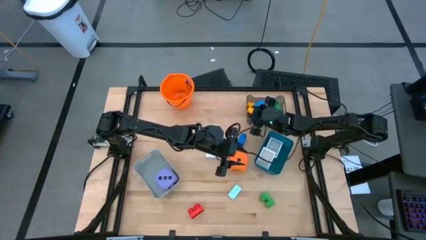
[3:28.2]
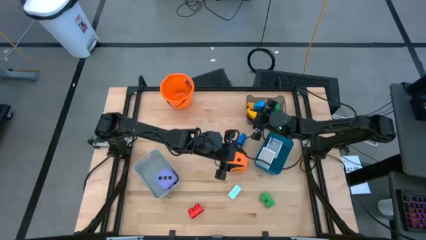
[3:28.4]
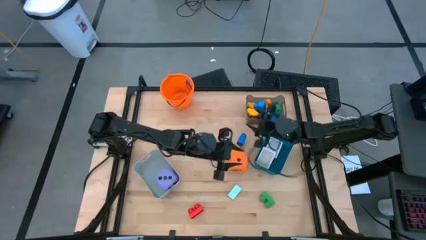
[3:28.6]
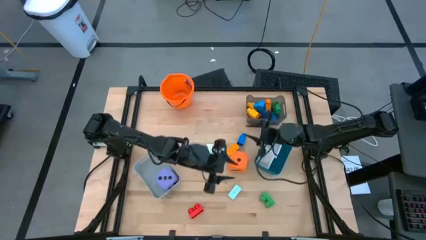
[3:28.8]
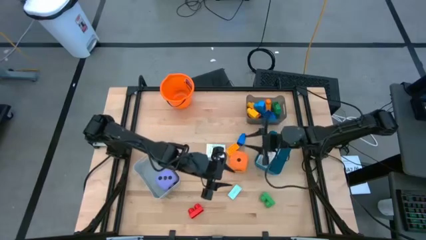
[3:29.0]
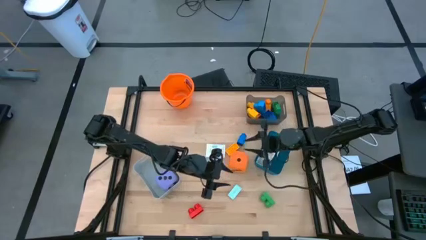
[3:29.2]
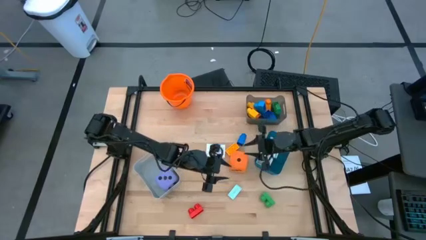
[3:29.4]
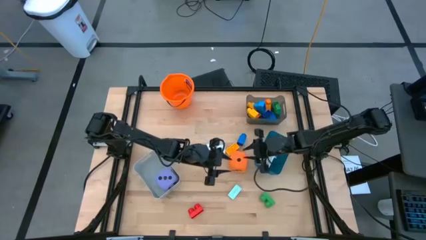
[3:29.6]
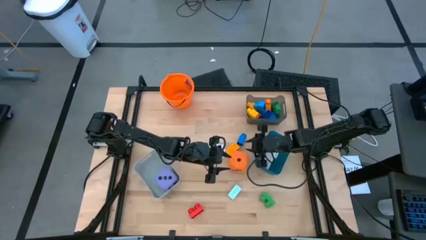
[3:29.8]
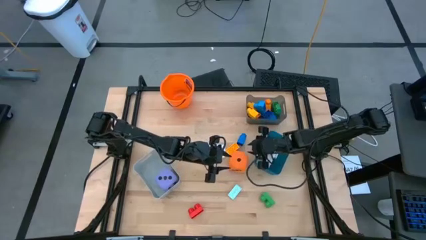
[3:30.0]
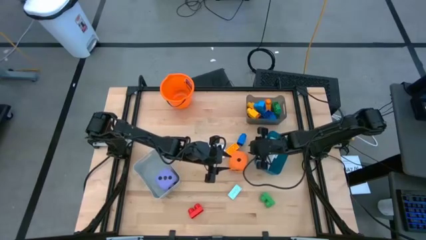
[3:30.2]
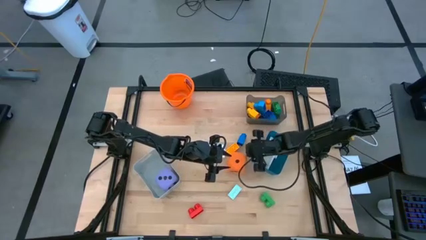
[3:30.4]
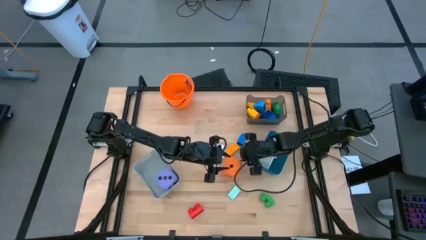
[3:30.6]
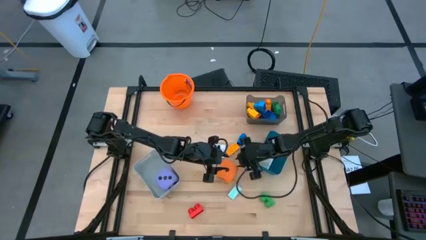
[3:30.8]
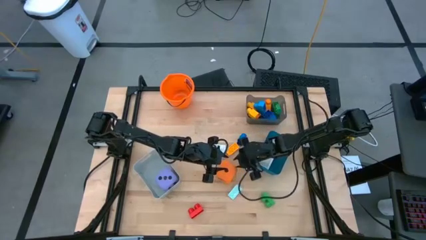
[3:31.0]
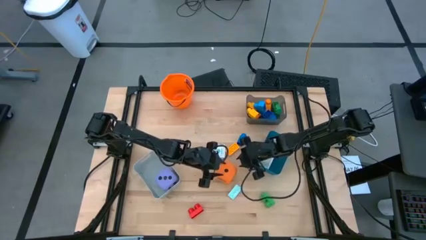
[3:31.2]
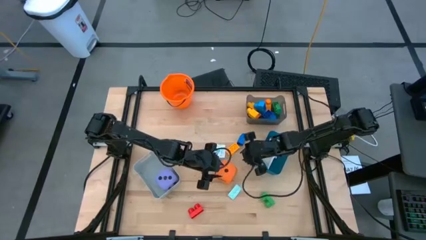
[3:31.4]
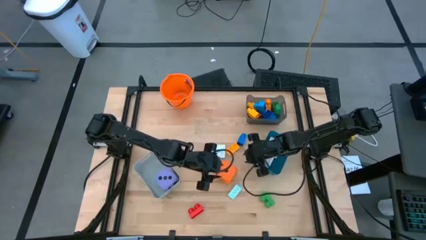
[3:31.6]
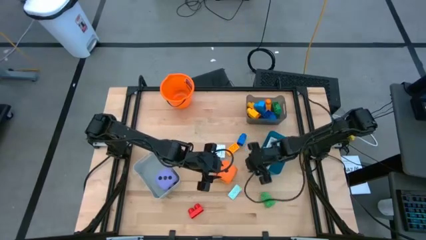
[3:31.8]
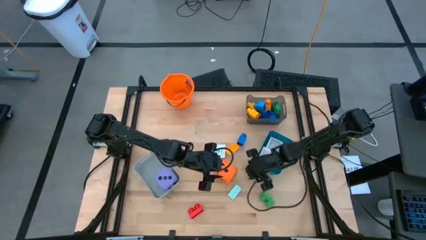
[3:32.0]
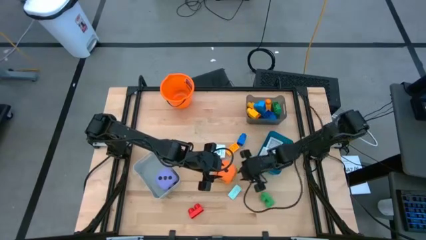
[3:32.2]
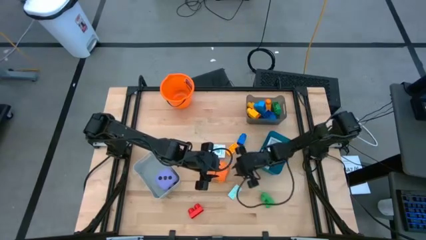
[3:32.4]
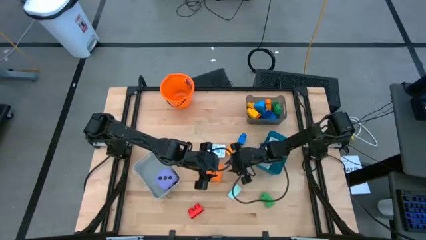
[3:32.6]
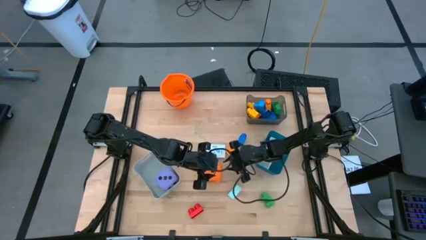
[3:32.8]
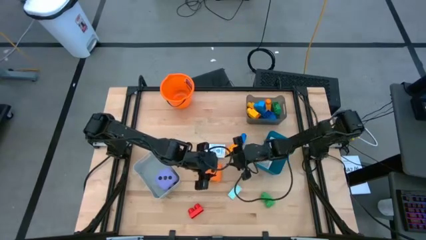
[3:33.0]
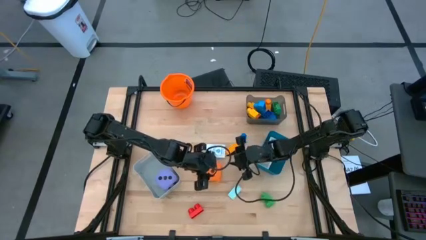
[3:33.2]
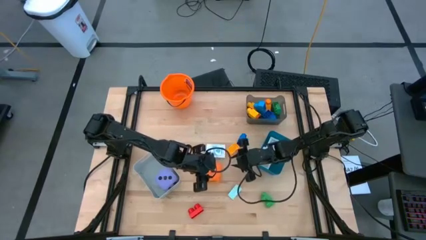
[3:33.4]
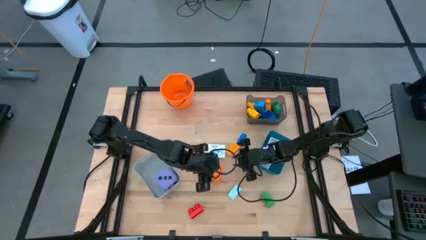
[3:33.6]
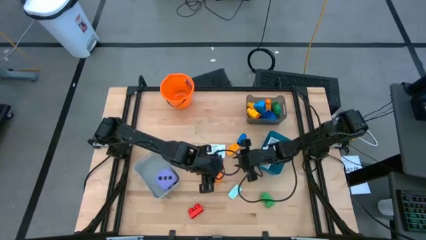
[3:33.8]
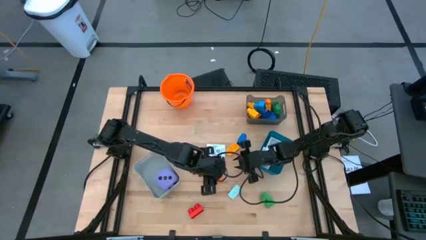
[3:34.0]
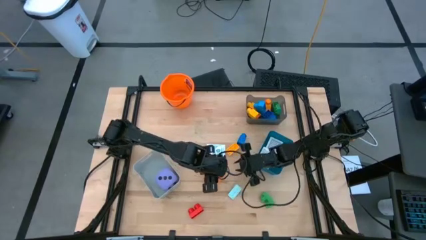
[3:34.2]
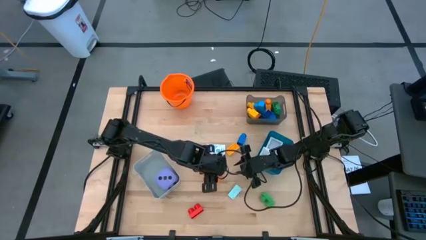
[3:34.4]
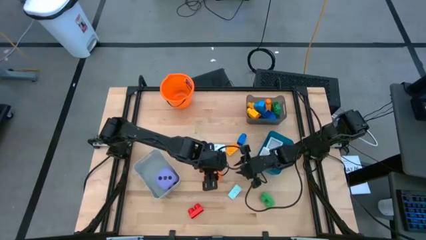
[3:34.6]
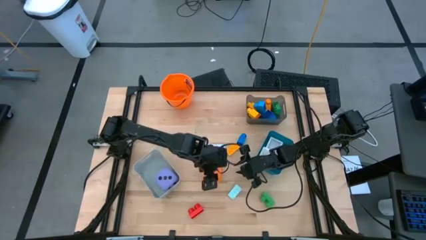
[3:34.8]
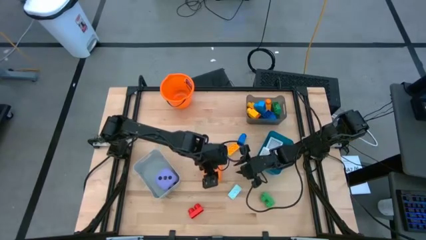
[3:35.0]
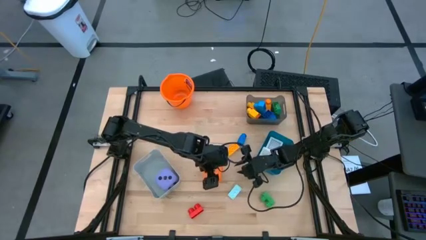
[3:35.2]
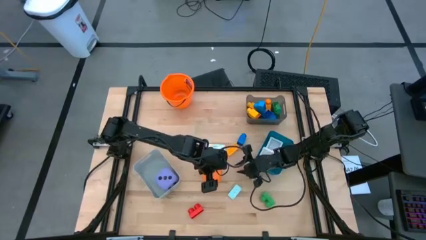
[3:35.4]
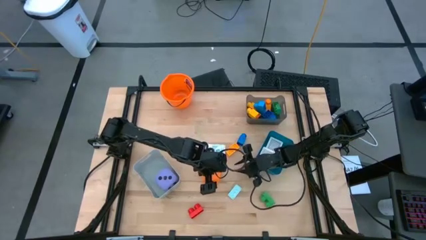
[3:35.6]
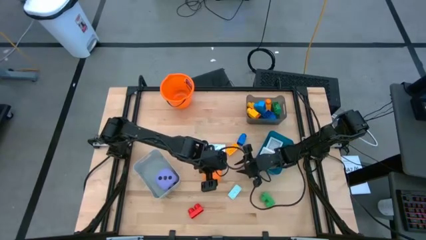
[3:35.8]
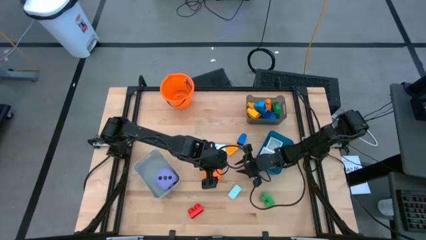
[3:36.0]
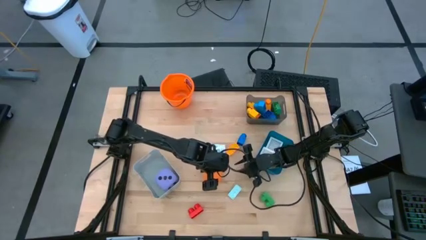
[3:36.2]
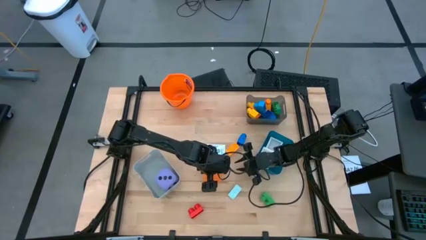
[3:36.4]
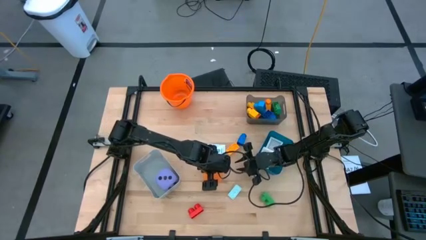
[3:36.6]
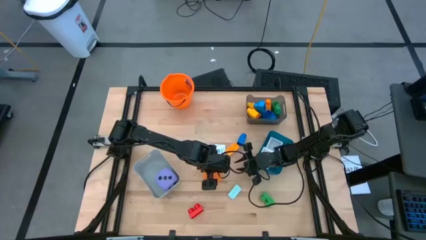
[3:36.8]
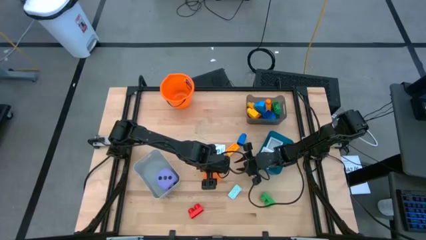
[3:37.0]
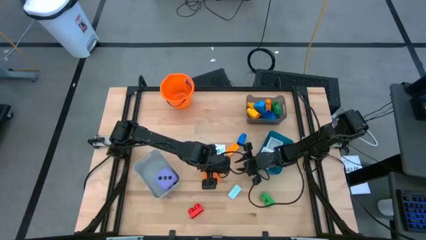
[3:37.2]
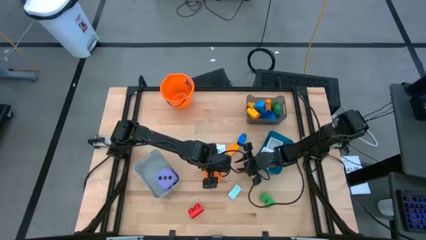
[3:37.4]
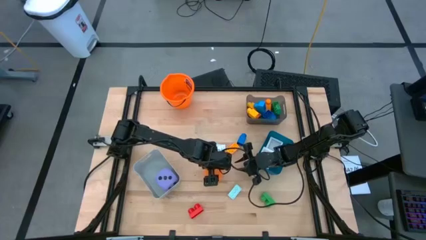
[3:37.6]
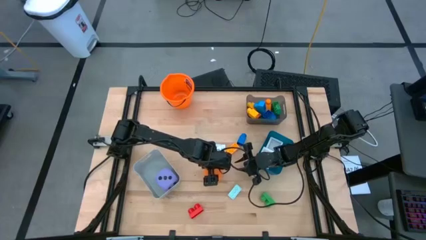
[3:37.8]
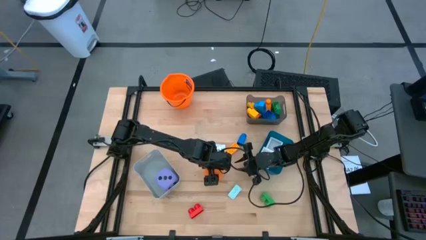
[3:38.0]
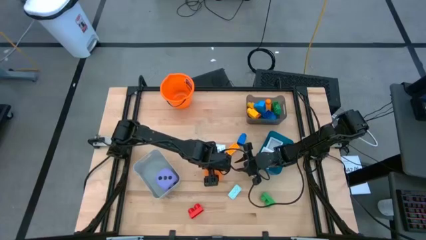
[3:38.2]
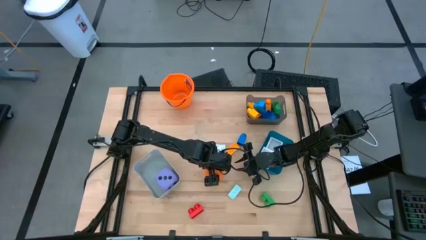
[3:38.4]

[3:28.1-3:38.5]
Task: Pick & Place Toys
Put the orange dice into the gray bin
